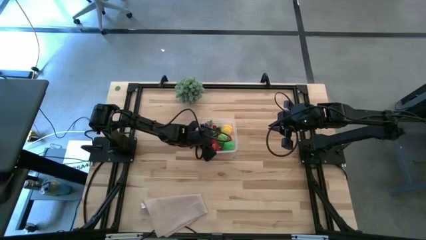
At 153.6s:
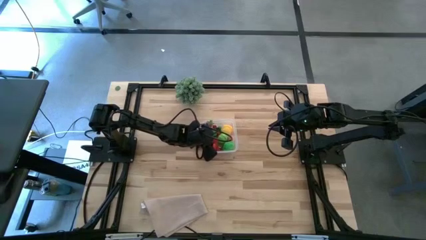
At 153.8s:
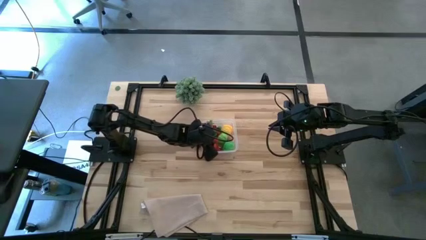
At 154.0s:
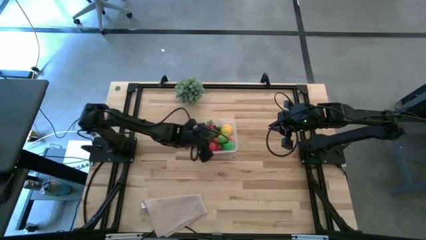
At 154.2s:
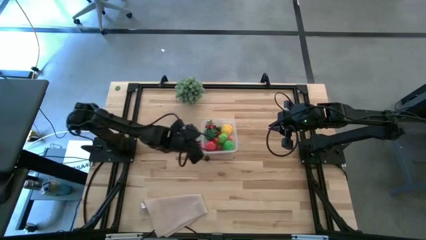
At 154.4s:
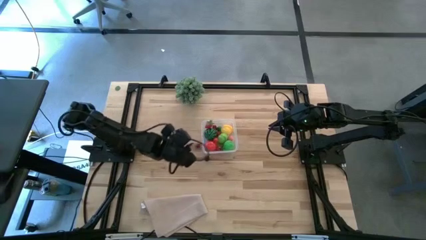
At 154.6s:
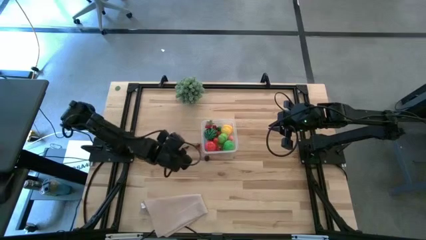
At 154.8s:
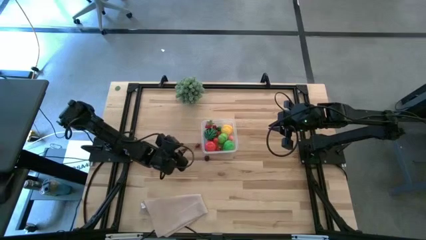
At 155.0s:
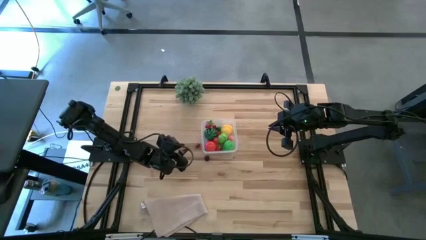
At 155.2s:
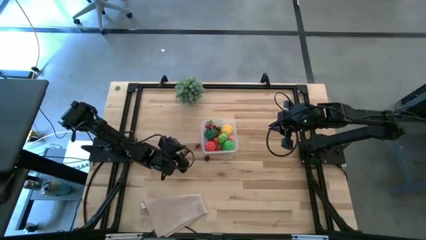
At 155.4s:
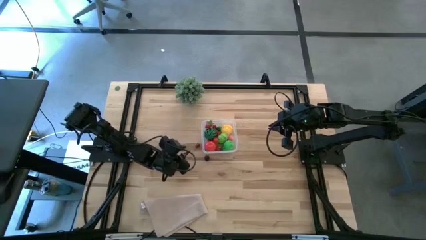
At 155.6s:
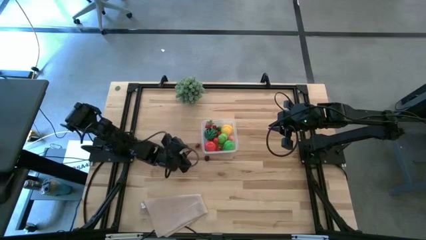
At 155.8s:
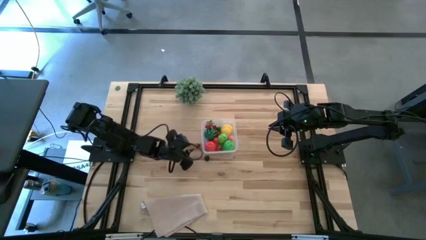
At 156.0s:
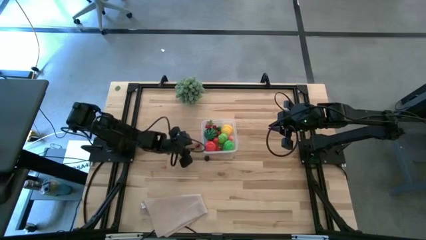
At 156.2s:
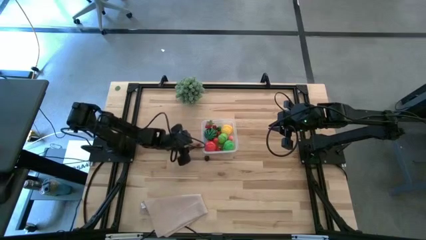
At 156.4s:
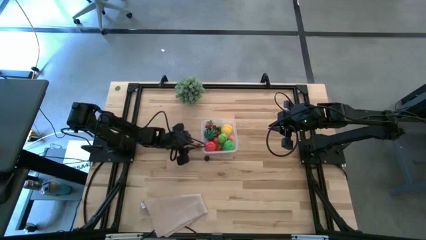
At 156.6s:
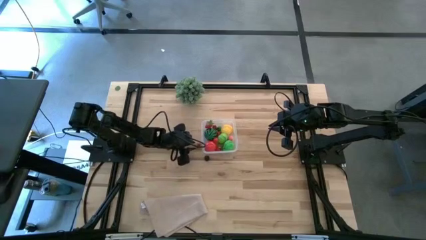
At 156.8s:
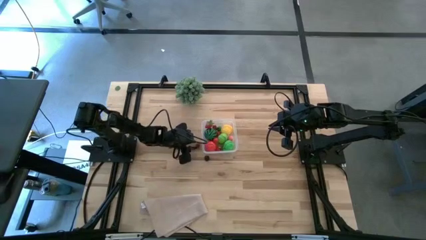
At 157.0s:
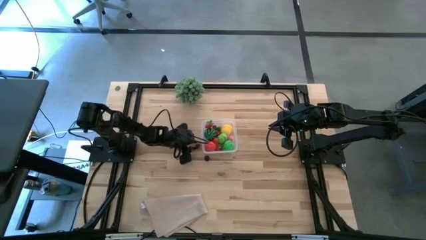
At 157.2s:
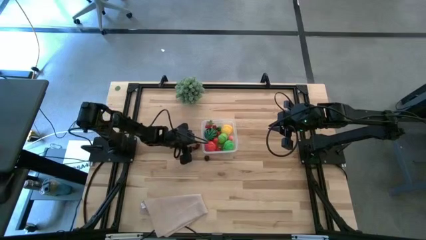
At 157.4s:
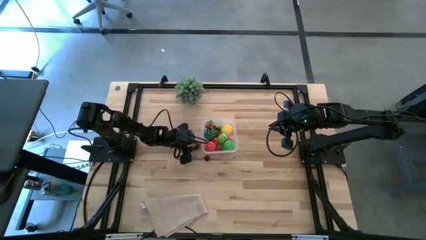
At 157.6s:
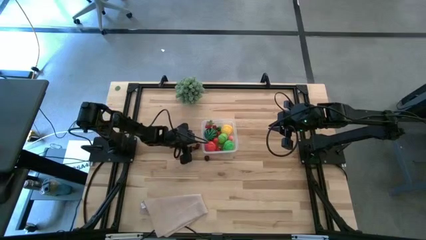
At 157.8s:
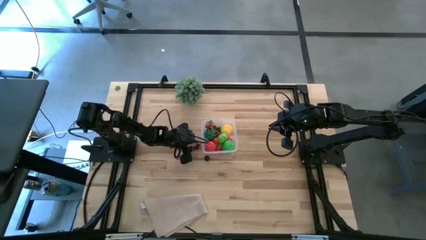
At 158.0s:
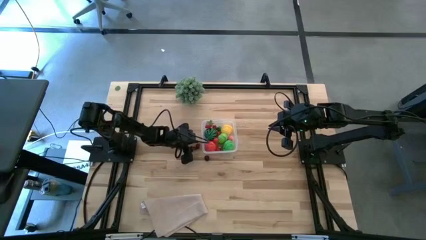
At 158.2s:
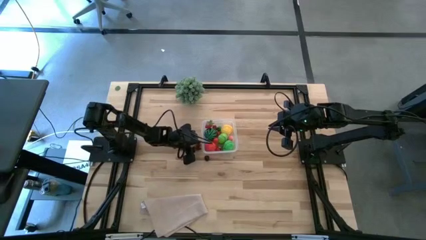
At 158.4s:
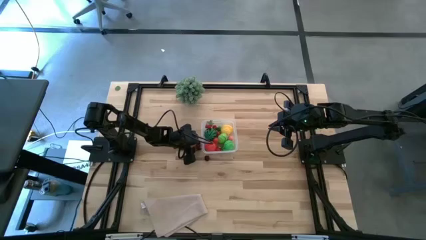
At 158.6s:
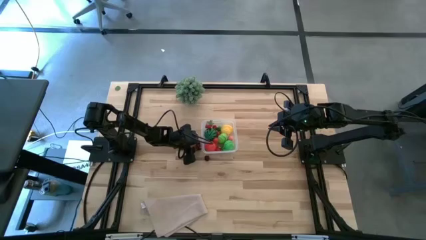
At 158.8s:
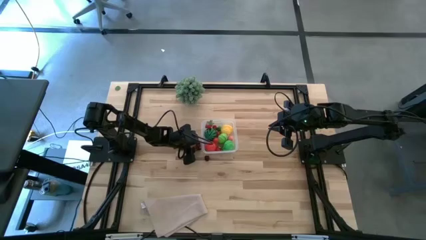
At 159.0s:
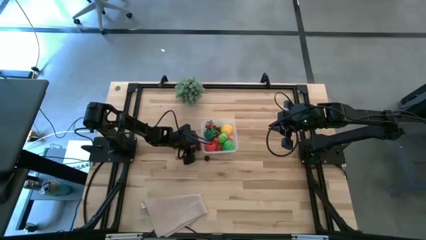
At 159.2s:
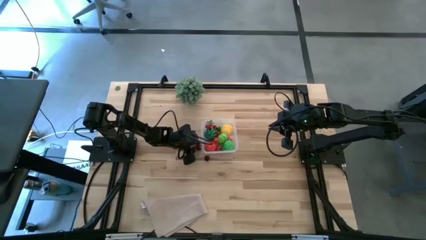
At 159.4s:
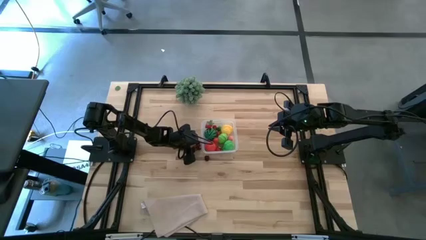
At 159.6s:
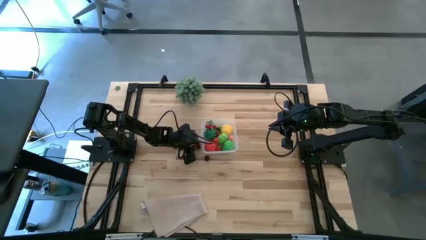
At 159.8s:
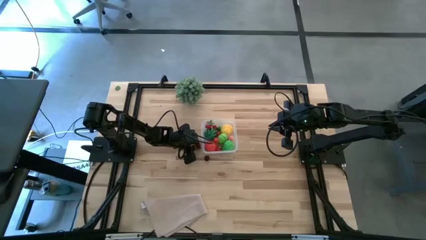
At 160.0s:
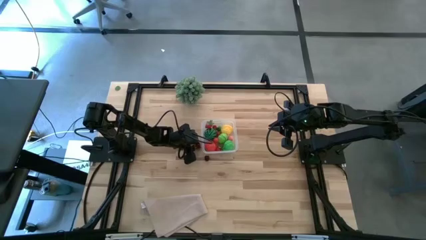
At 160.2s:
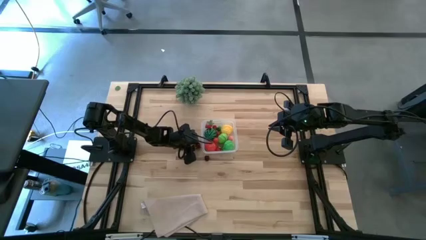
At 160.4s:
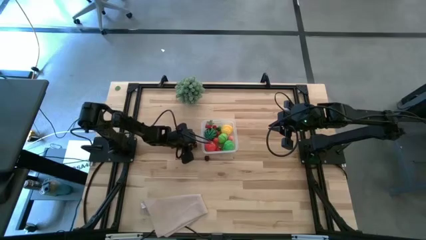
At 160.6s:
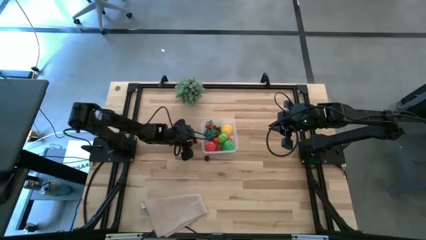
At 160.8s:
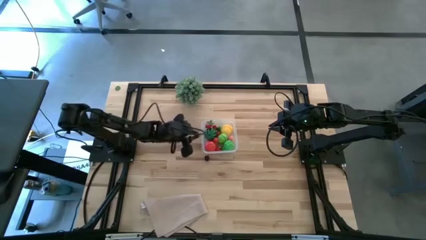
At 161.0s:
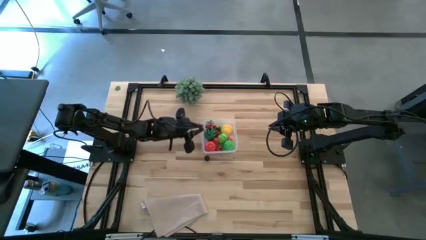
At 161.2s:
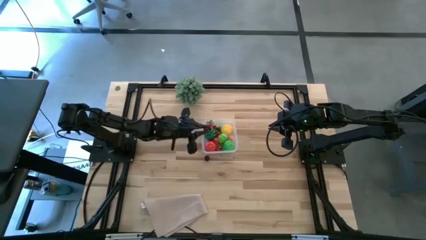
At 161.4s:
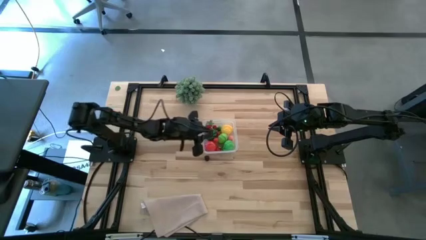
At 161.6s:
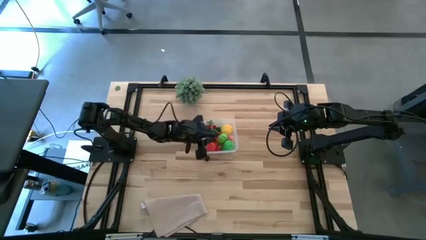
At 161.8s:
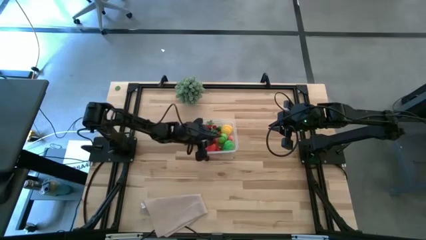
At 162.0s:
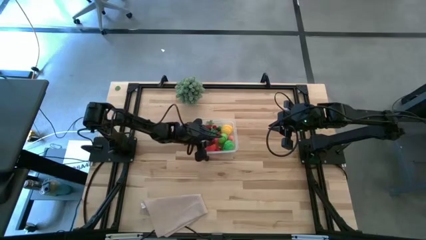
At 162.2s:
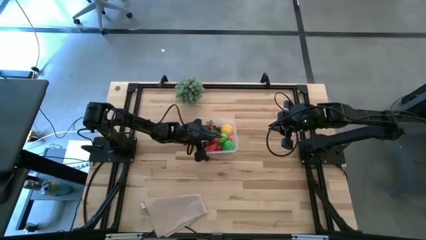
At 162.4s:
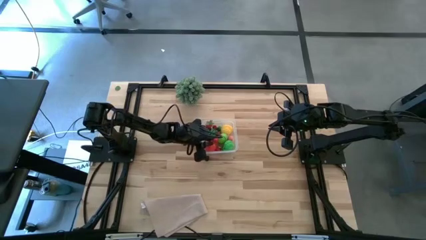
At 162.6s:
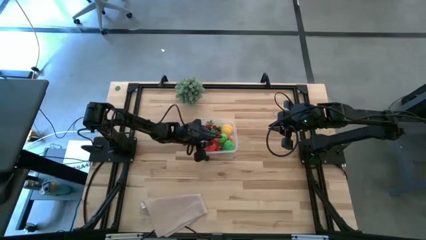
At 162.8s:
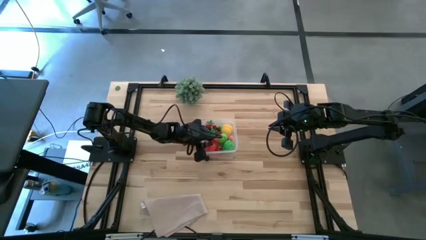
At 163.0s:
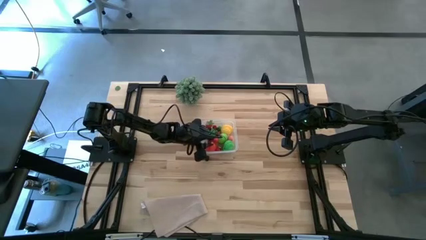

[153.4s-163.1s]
Task: Pick and placing Produce into tupperware
Put the red cherry into the transparent bin

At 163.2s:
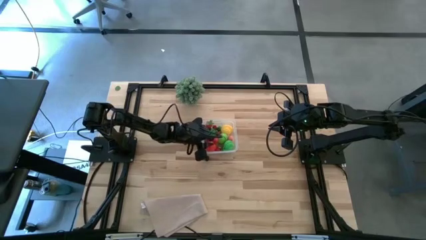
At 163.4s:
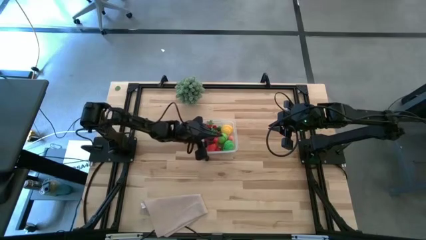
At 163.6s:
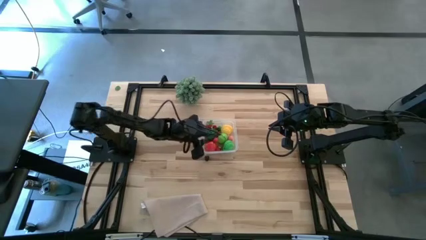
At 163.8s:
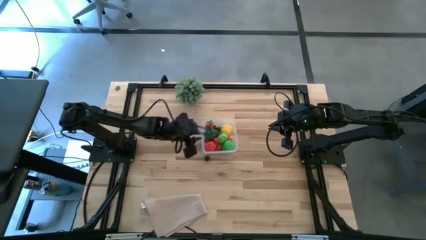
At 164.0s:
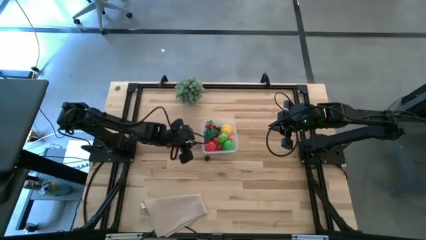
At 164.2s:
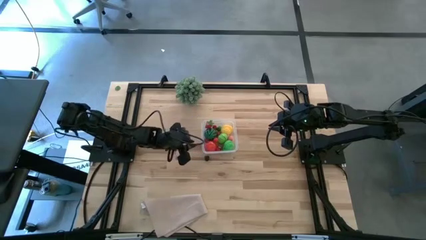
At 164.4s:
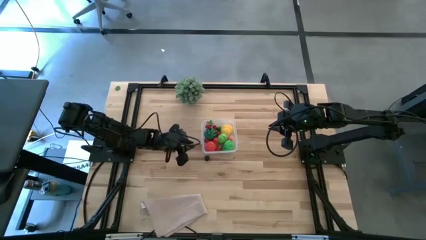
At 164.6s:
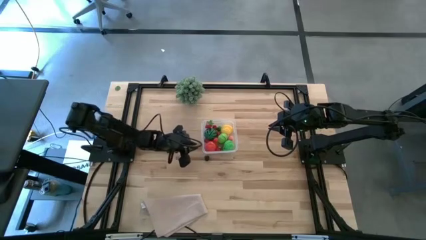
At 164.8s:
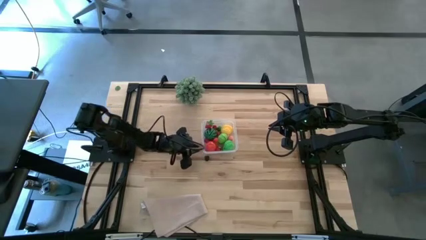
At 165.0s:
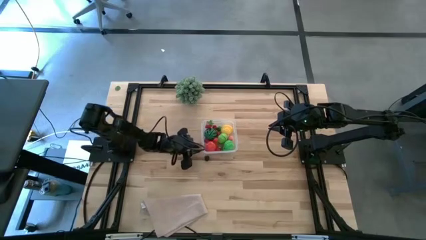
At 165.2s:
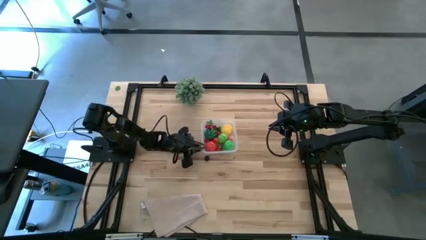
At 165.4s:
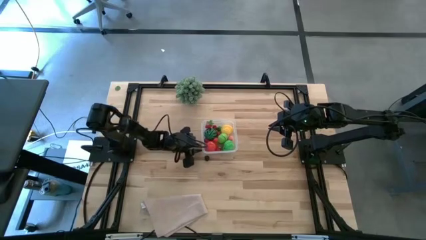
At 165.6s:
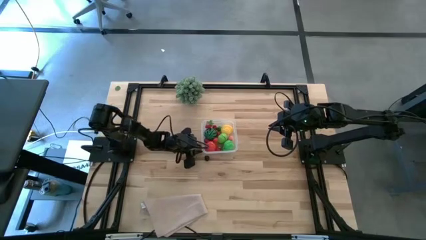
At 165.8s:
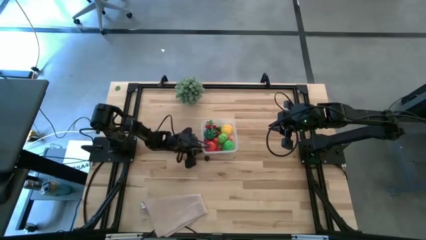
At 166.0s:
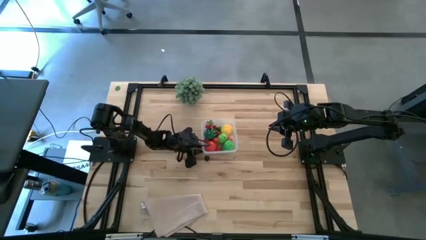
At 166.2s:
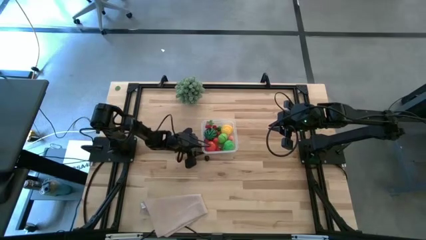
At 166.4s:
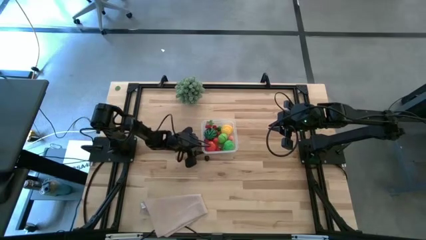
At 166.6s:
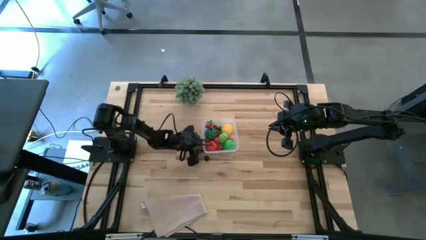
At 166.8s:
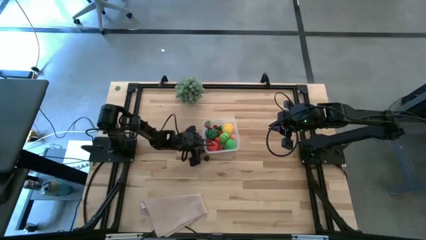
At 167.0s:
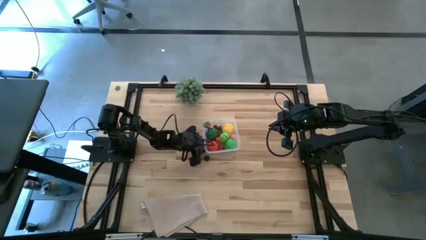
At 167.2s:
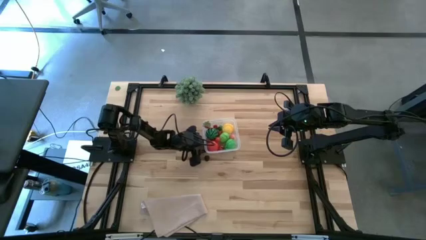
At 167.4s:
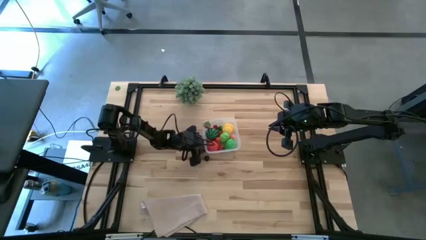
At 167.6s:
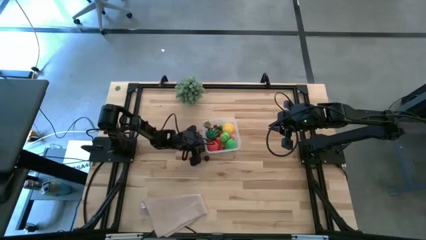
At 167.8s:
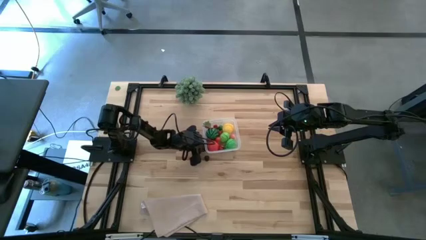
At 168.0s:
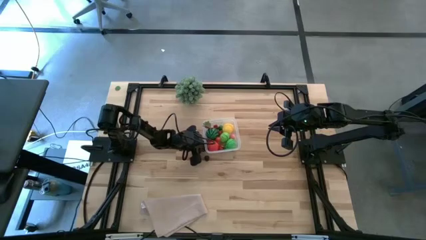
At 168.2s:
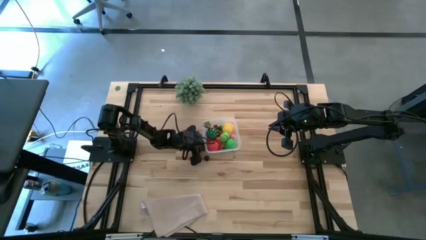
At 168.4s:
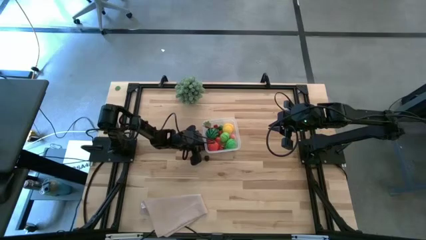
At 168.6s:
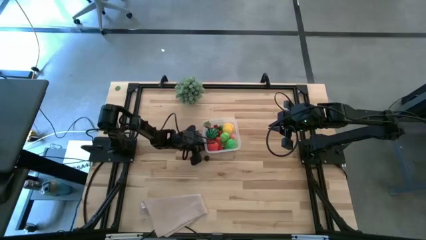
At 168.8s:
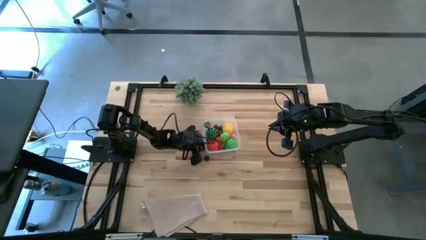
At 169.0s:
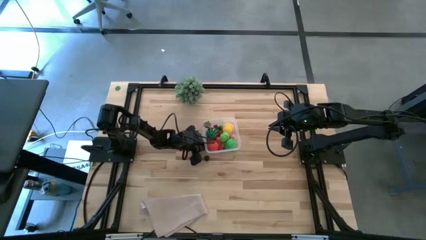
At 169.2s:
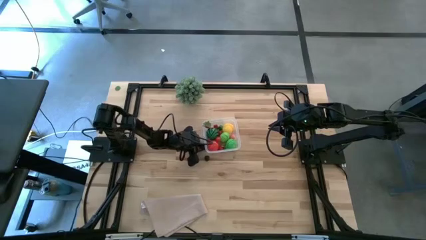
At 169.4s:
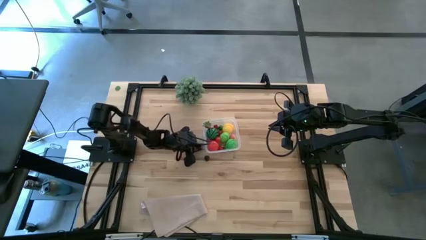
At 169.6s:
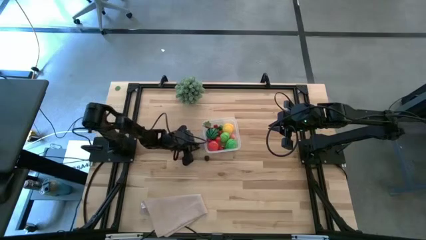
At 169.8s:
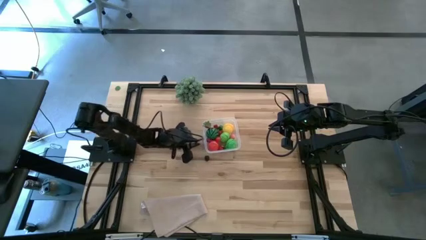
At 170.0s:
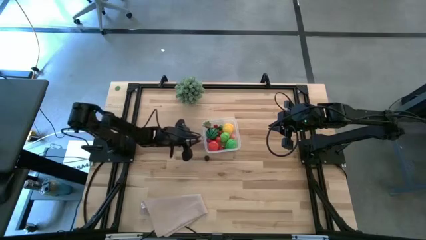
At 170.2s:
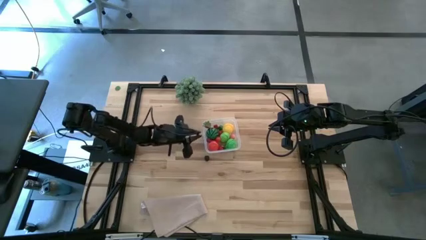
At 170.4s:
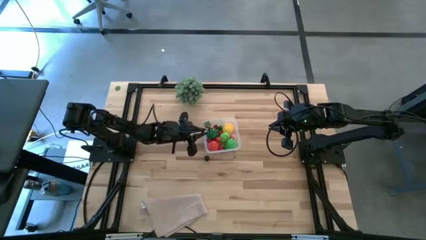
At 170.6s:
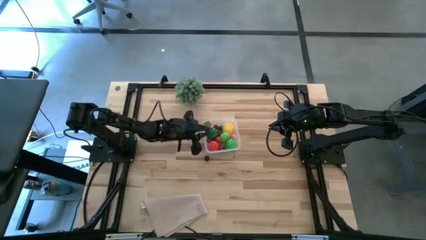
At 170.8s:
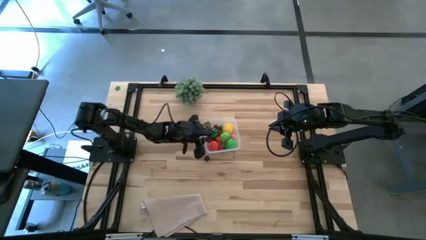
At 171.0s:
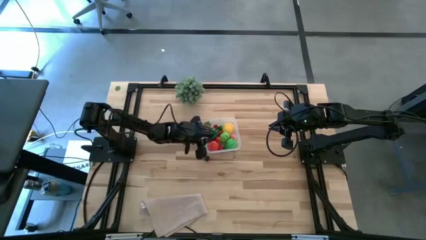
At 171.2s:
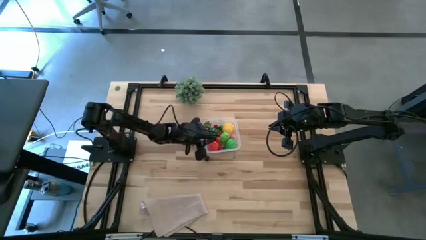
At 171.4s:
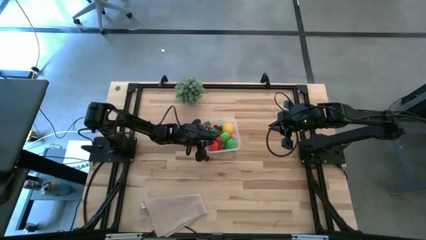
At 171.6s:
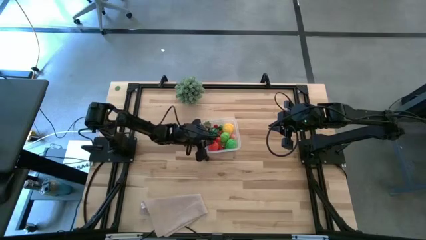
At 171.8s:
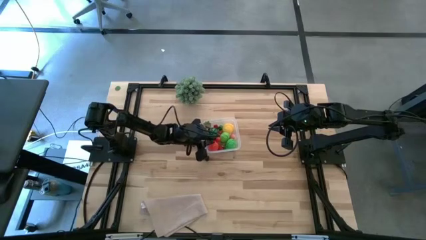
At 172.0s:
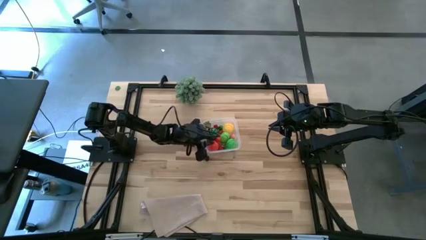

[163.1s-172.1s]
Put the blackberry into the transparent bin
